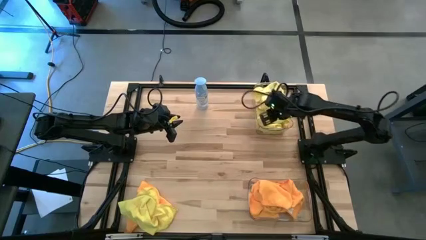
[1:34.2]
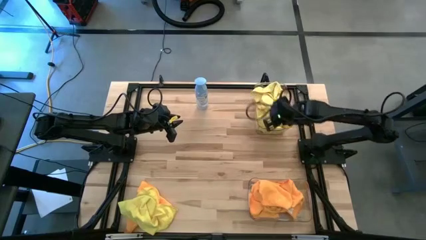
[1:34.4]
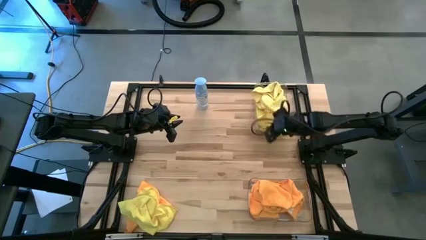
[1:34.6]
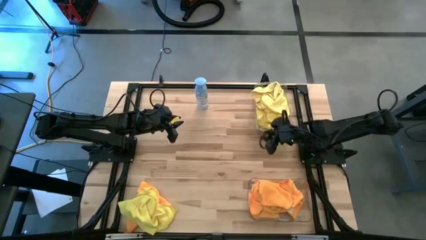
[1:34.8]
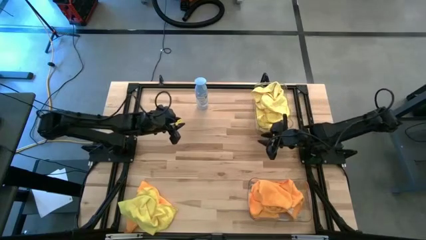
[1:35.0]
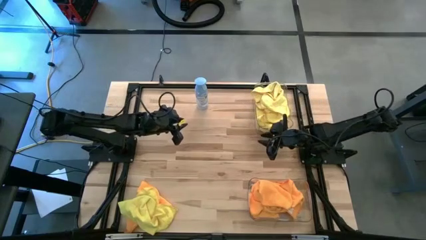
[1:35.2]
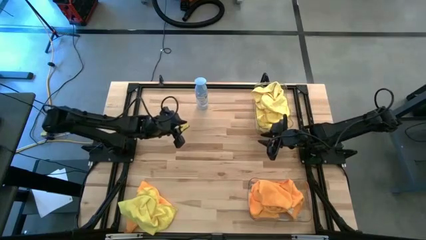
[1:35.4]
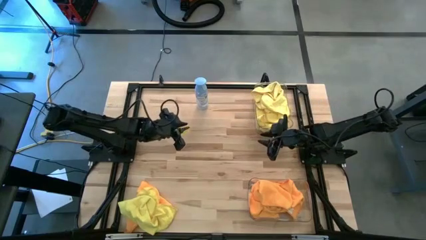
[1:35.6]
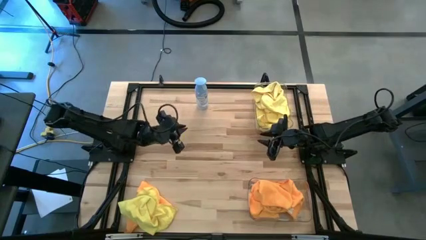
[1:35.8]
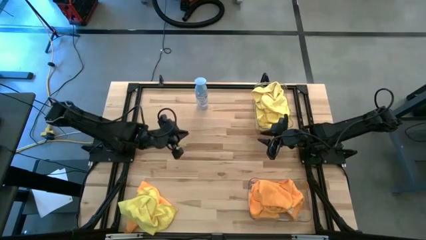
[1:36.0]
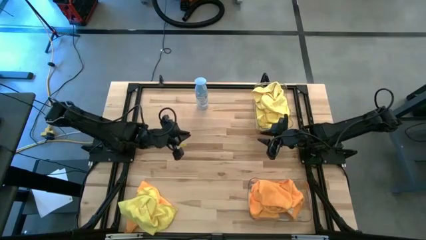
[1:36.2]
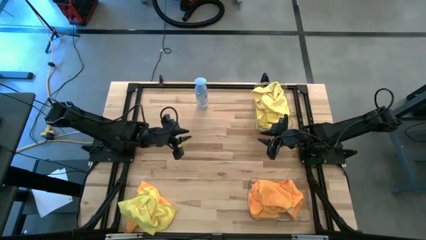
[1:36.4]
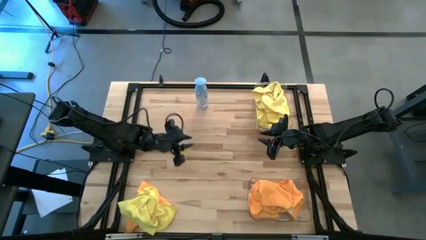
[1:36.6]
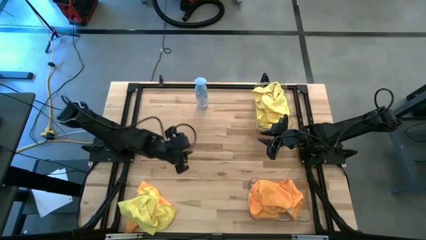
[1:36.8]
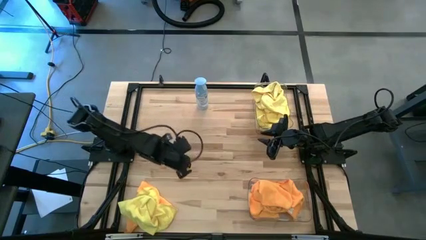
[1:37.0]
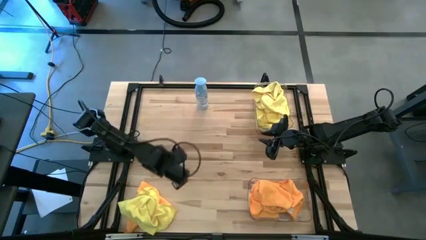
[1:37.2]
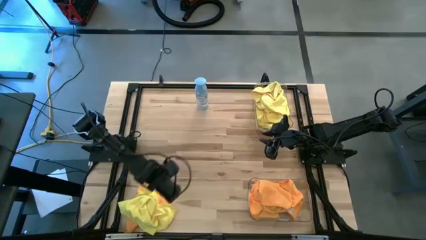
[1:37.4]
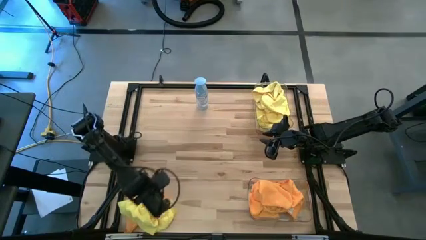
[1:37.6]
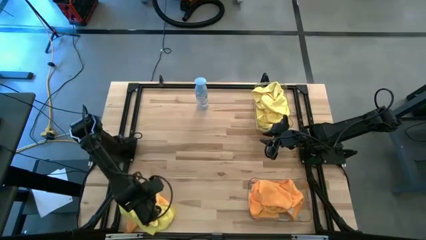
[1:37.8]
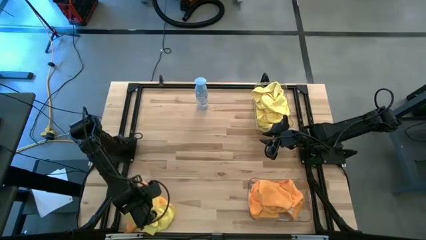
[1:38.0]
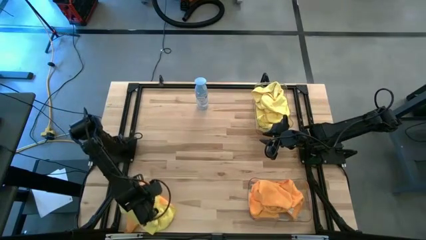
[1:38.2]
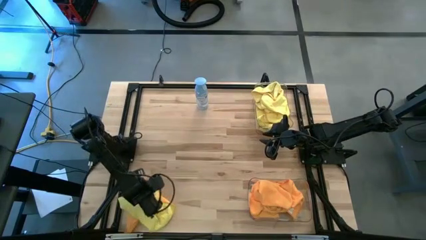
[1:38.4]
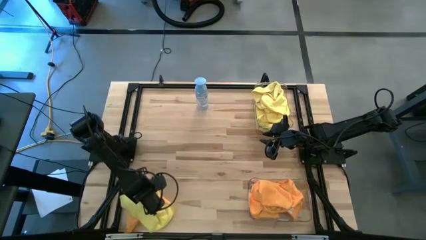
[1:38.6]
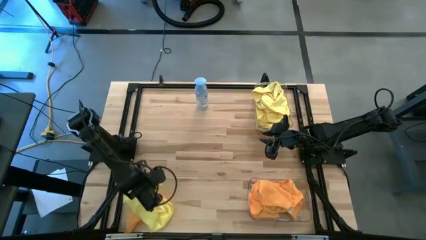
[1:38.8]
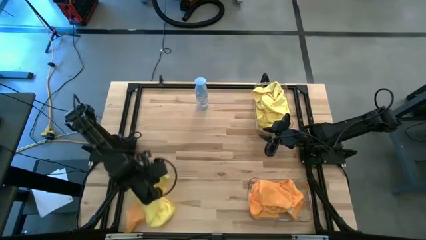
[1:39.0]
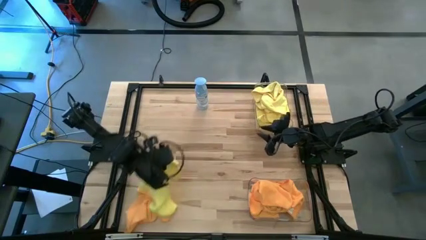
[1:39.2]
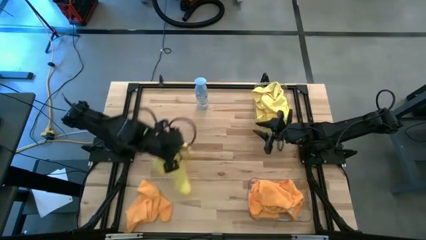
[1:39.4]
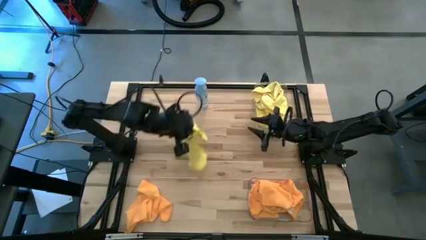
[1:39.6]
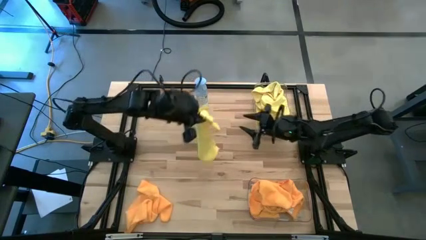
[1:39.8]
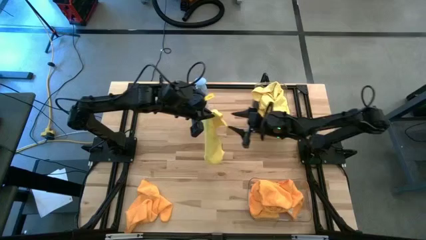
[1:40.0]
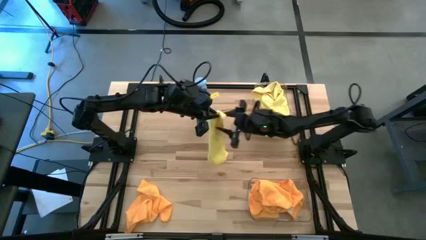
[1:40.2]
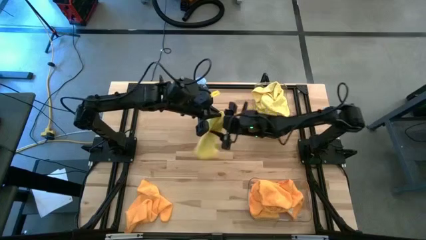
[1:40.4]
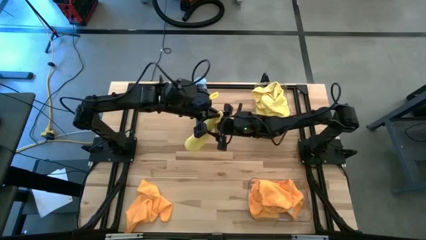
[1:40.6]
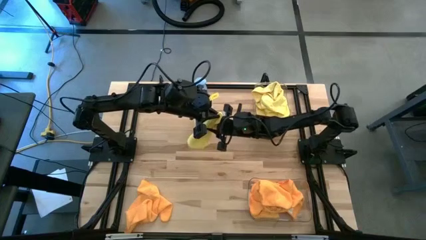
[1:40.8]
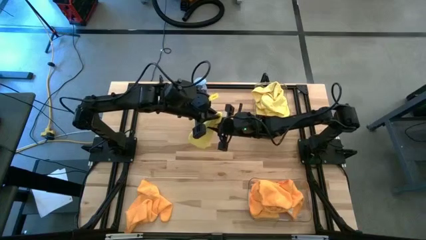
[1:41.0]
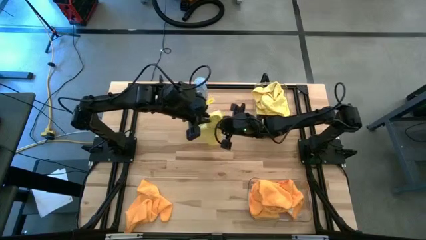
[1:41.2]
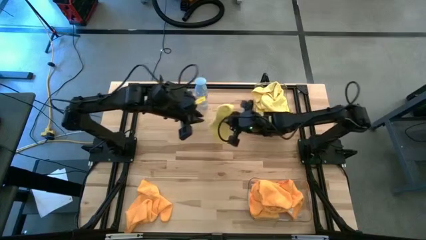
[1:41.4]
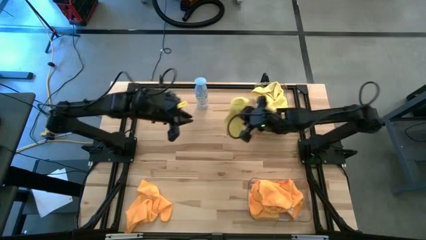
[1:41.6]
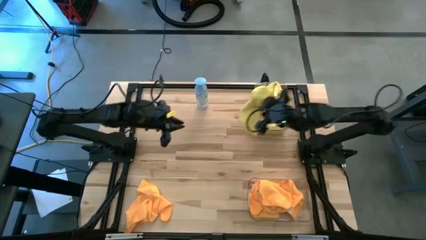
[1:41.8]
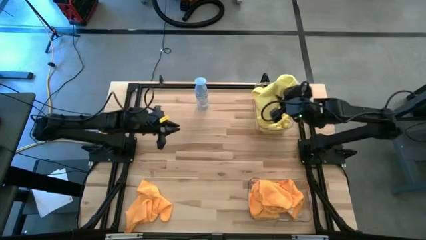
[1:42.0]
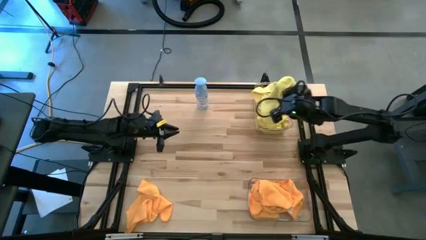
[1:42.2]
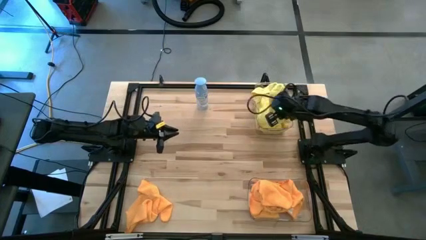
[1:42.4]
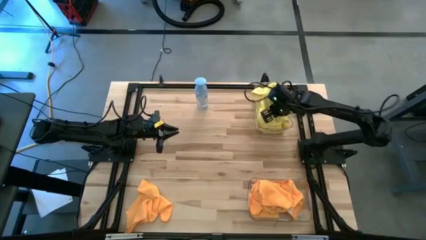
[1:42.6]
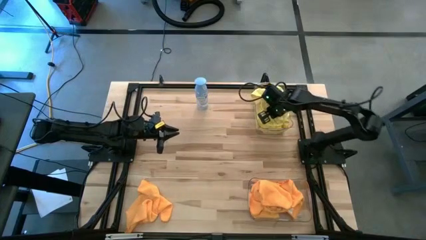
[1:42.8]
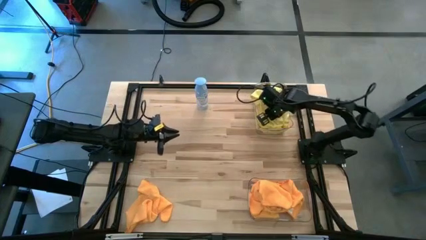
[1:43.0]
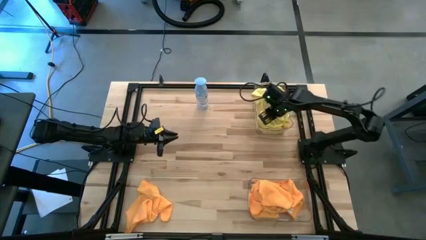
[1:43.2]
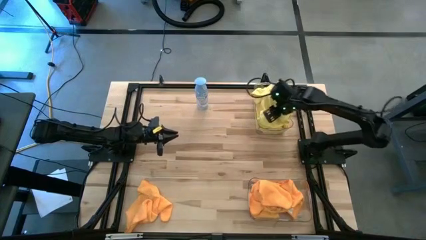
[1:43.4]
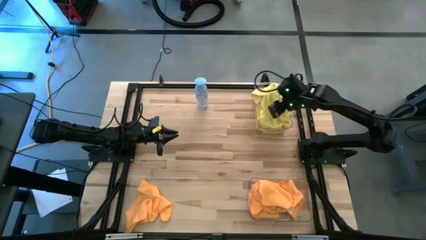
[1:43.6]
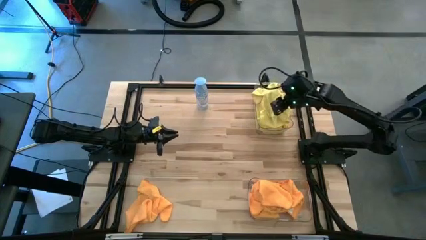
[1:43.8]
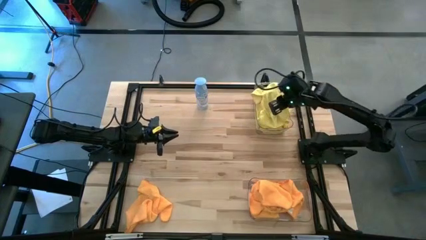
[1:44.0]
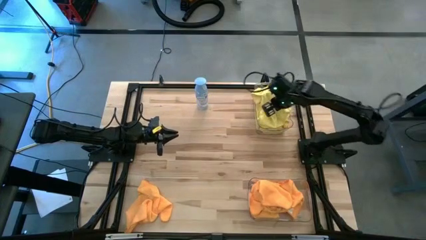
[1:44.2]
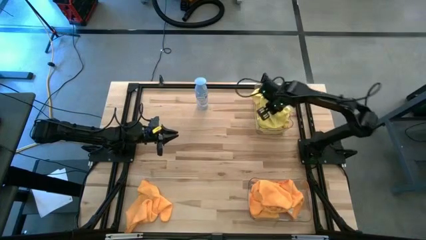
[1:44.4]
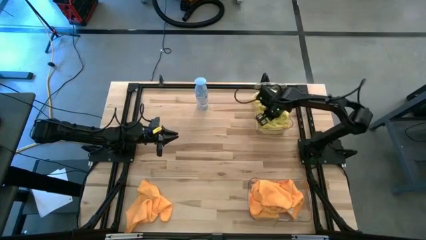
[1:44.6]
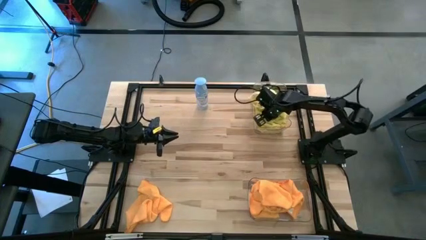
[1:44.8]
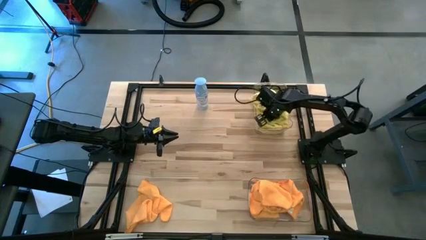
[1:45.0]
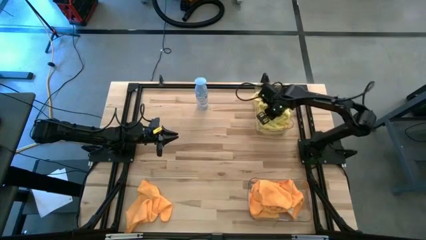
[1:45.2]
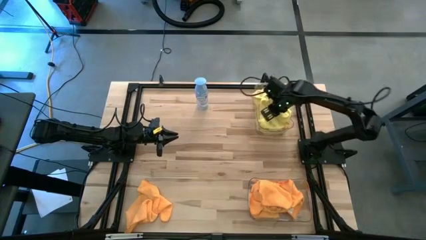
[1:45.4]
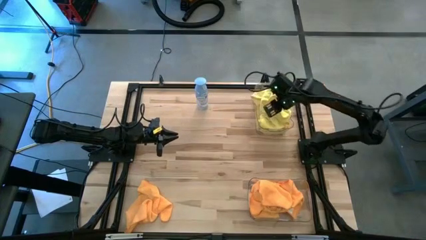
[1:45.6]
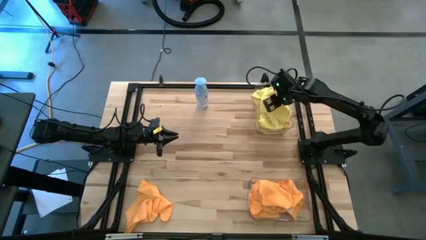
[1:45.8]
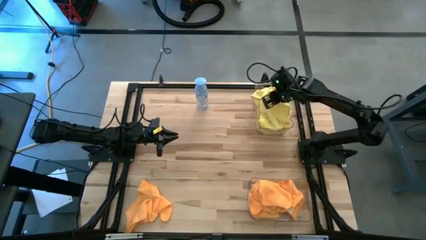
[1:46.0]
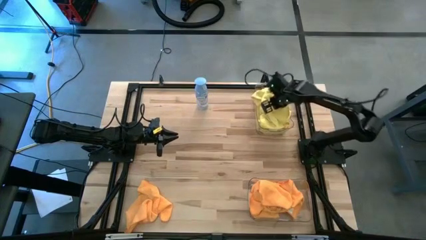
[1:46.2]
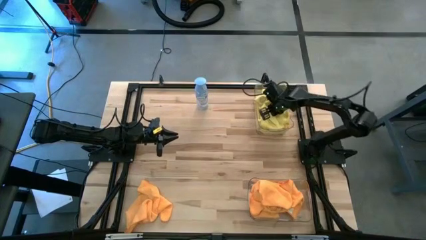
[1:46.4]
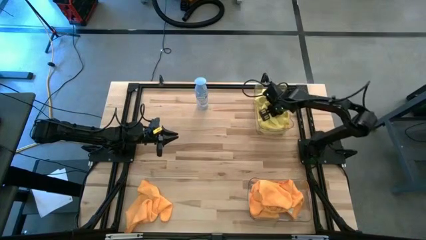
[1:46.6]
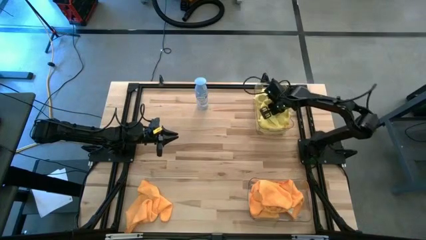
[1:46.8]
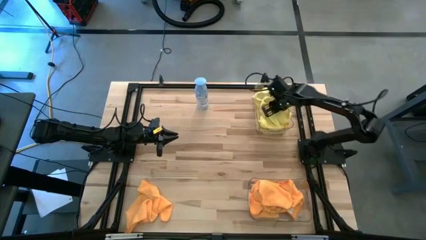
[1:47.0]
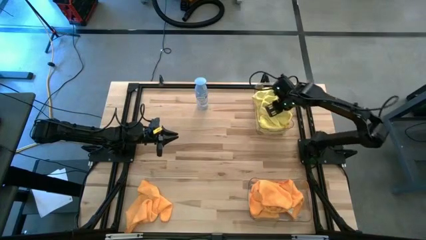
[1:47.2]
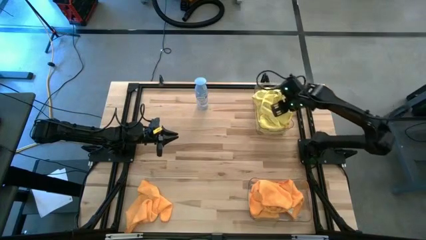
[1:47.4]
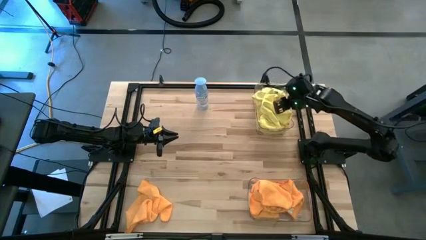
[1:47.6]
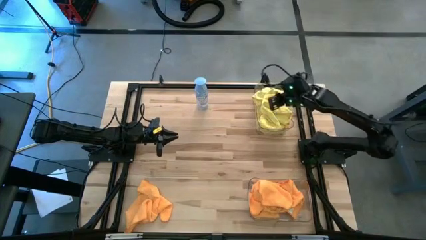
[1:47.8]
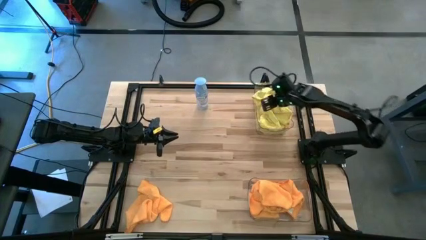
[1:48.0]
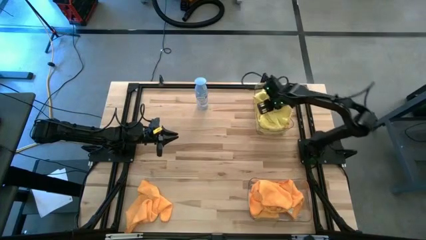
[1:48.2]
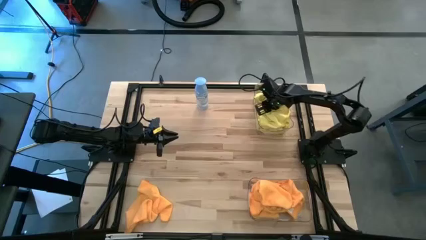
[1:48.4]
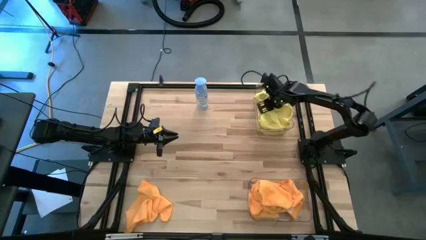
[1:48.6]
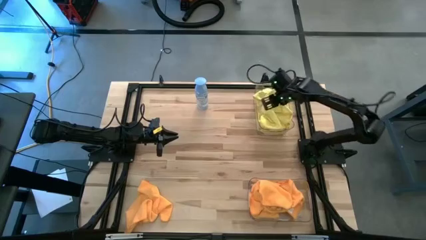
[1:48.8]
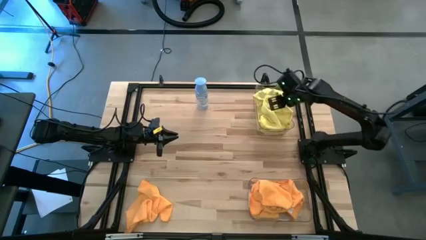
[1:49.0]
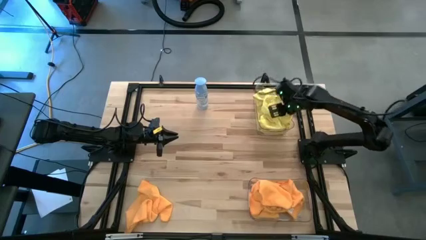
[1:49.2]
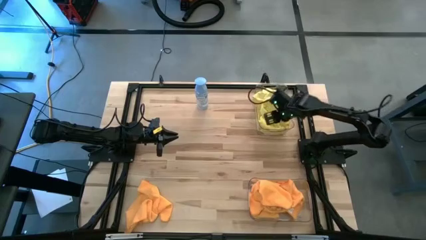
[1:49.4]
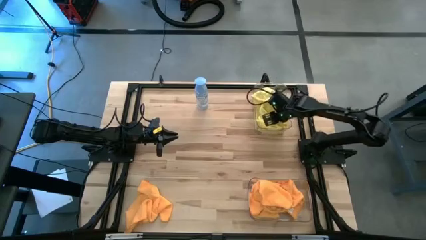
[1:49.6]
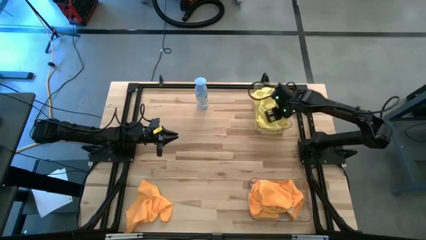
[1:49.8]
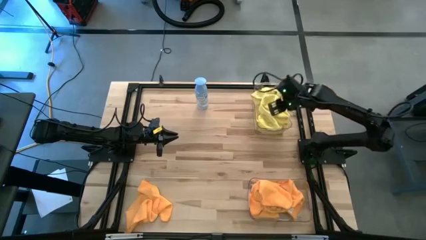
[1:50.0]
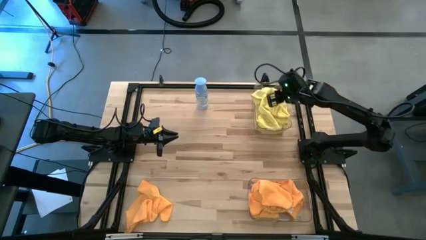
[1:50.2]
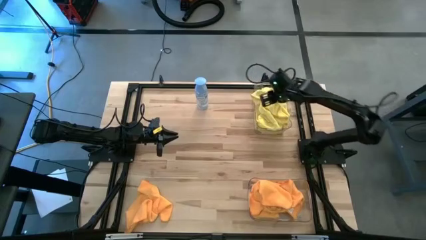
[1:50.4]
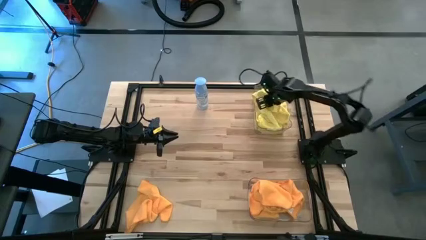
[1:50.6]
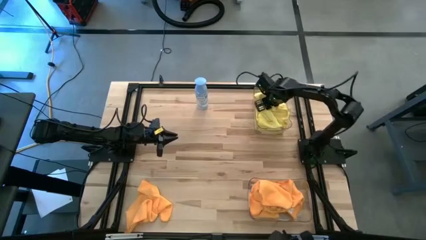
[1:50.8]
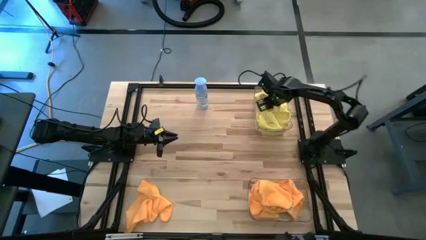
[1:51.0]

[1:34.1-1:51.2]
Task: Sort microfiber towel by color & place in baskets
Put the yellow microfiber cloth into the top transparent bin

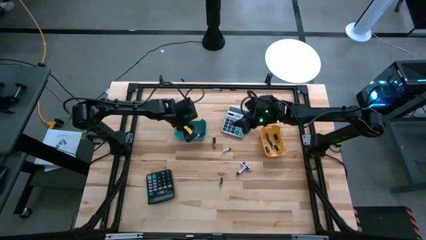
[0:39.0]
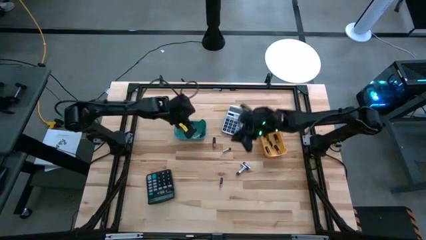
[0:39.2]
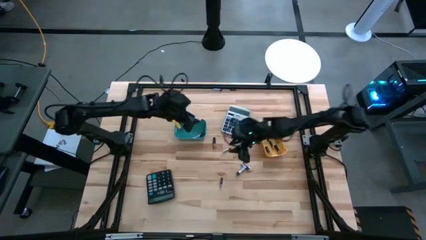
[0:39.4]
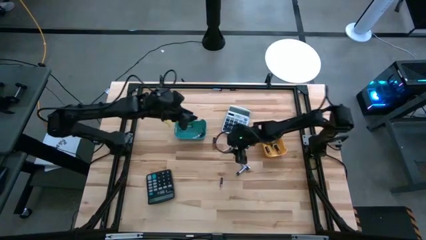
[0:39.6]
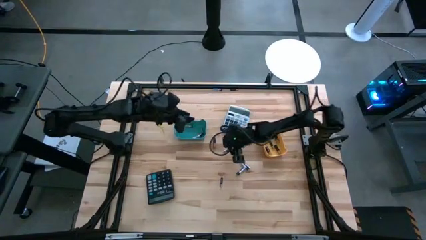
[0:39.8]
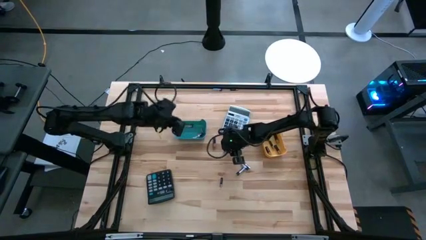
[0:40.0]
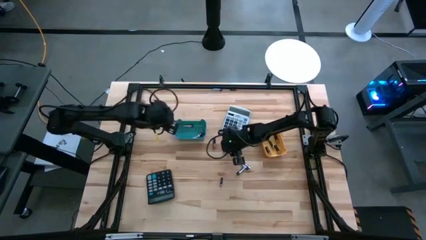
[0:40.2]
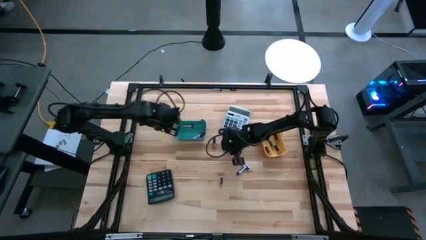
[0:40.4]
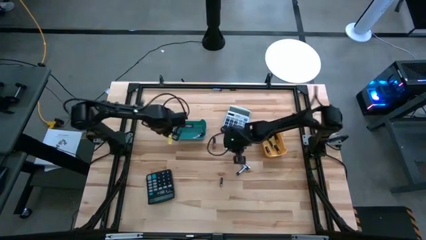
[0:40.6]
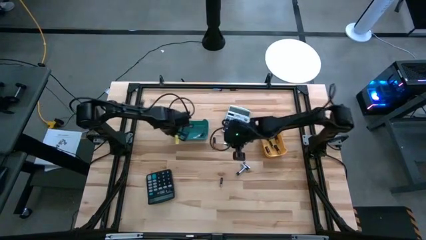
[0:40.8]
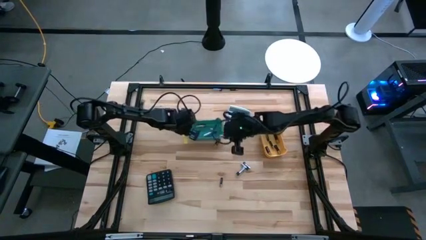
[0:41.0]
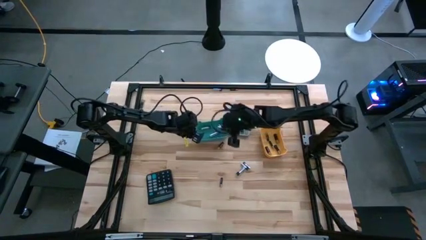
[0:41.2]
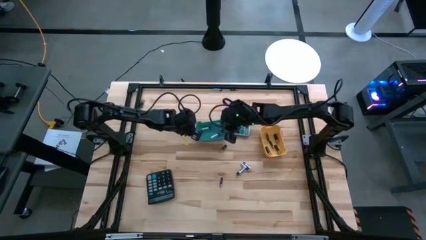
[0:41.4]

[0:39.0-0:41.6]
Task: Sort batteries
Put the silver battery into the blue bin
